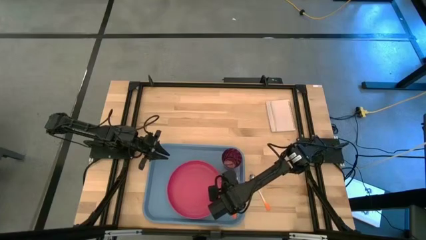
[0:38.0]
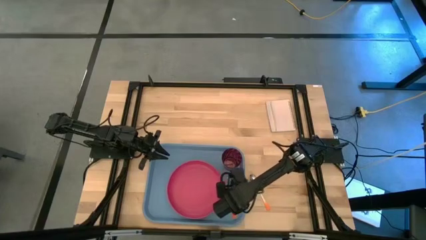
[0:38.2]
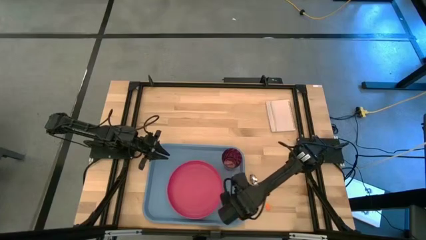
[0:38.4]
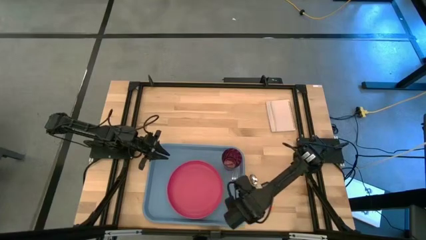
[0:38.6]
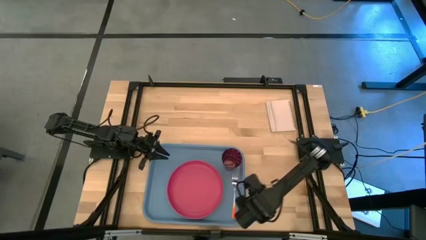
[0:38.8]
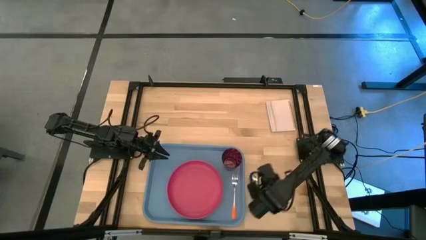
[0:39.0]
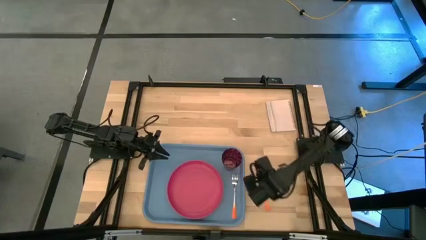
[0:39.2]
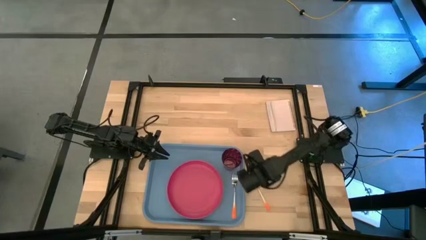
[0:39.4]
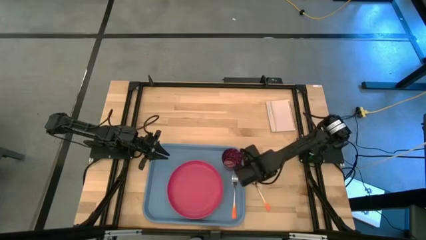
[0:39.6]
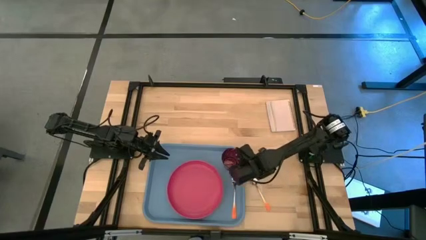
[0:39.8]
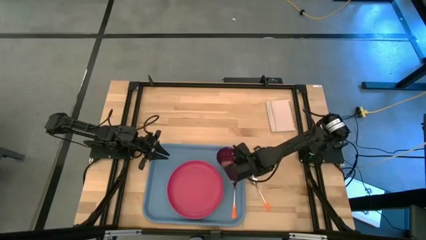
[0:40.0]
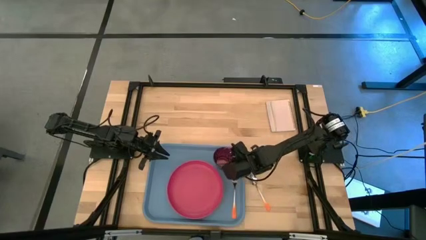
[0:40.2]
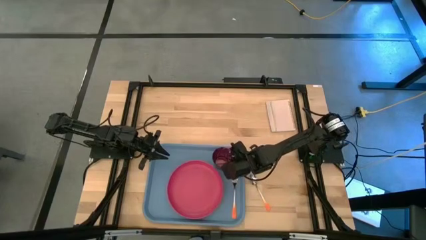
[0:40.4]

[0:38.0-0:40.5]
Task: Pick and place plate/cup/fork/spoon on tray
Adjust the red glass on the blue serving tray

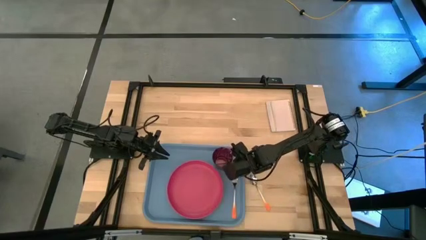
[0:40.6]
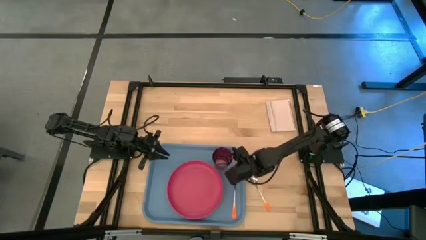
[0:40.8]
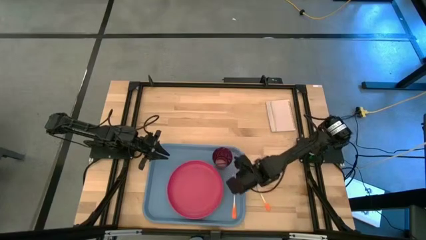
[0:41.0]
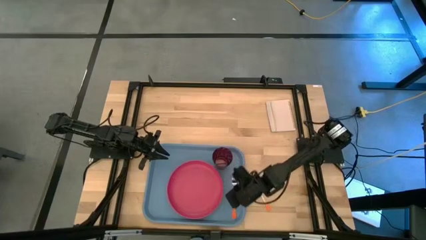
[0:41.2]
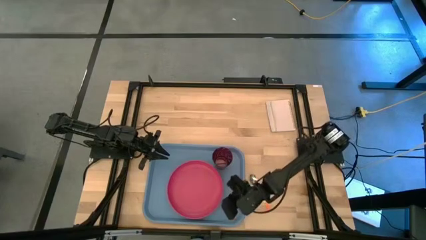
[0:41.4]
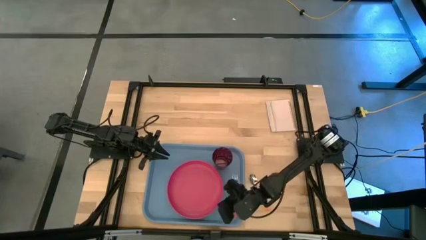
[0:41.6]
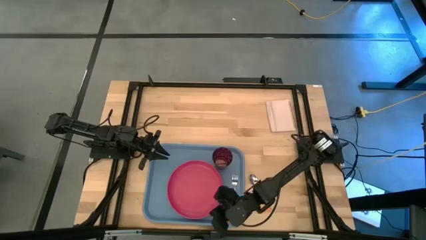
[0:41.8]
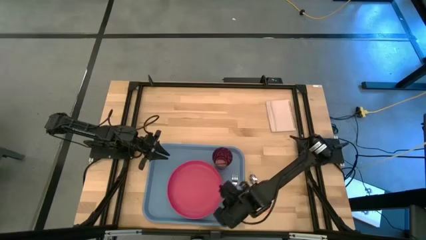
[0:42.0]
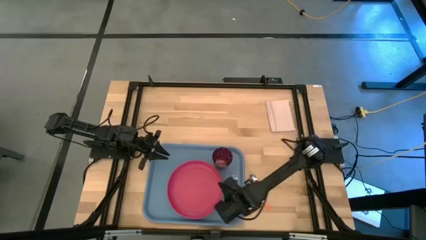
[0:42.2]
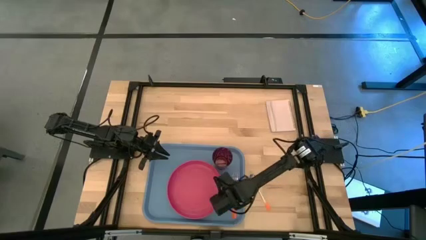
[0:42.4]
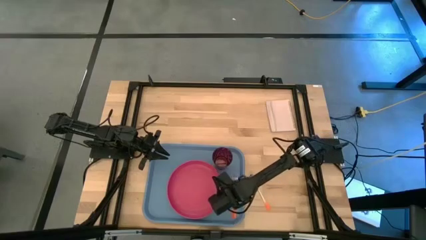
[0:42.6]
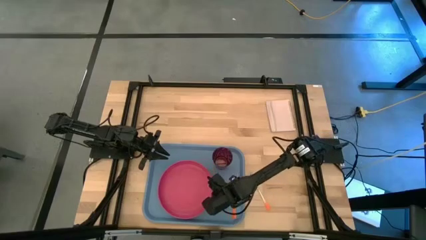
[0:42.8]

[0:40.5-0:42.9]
Adjust the pink plate on the blue serving tray

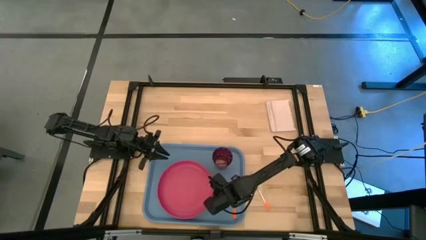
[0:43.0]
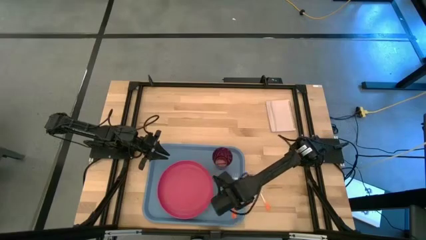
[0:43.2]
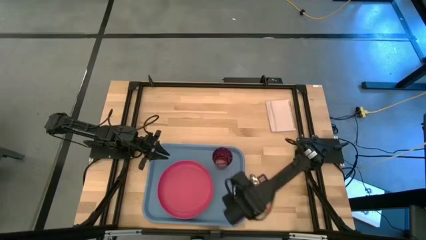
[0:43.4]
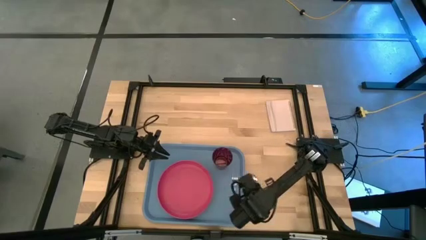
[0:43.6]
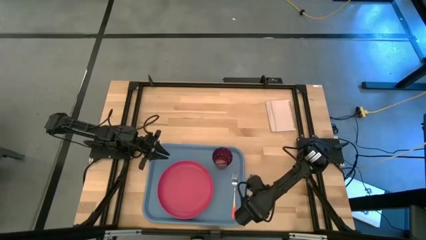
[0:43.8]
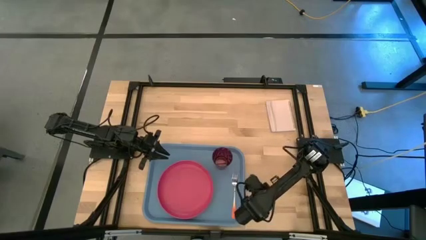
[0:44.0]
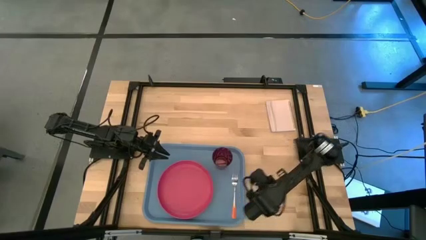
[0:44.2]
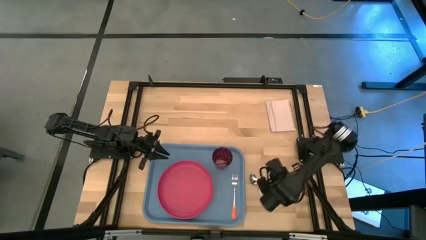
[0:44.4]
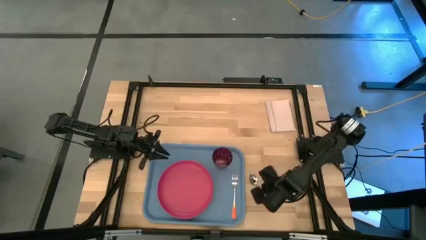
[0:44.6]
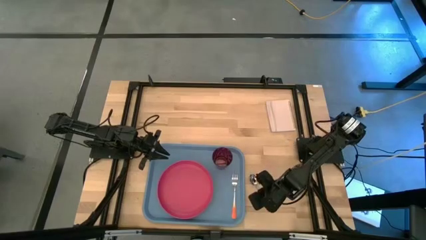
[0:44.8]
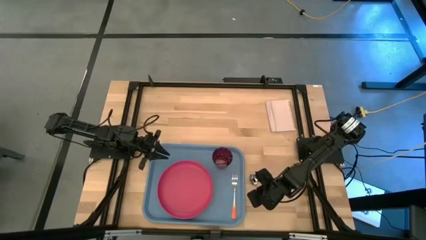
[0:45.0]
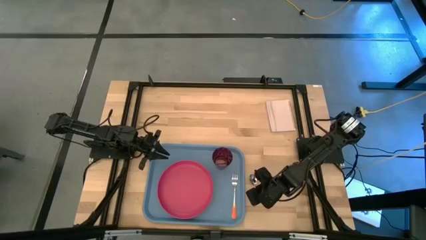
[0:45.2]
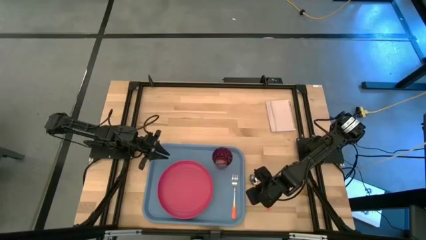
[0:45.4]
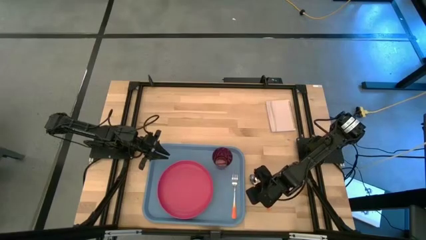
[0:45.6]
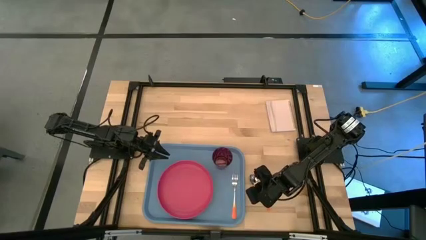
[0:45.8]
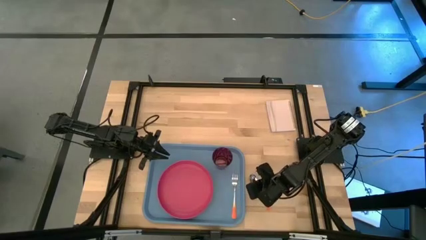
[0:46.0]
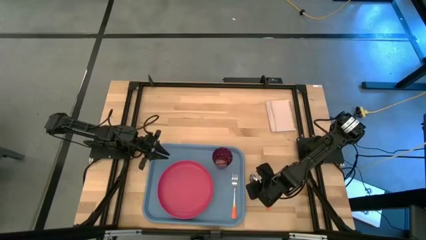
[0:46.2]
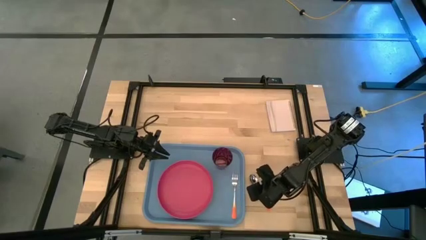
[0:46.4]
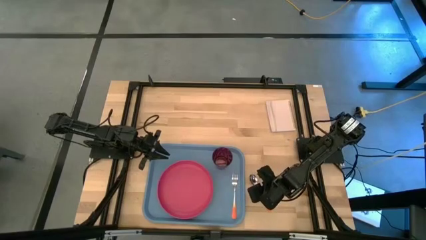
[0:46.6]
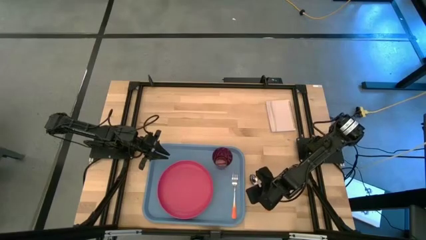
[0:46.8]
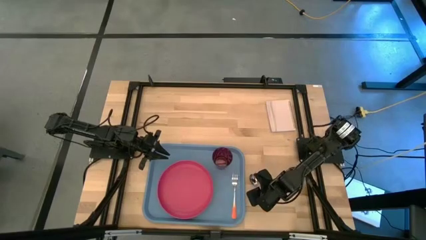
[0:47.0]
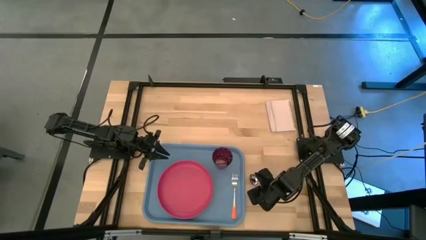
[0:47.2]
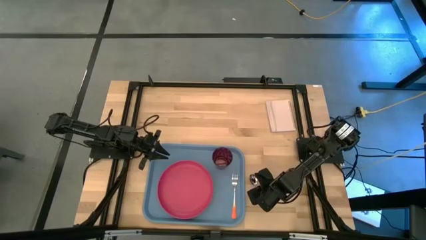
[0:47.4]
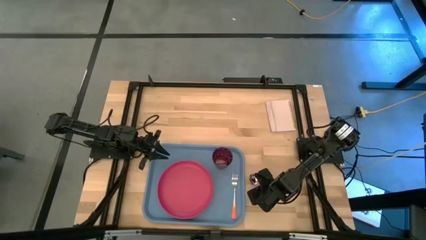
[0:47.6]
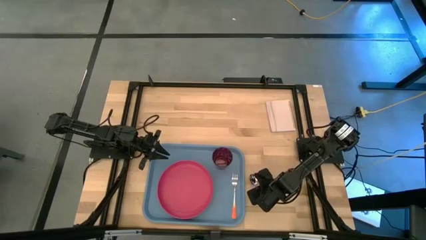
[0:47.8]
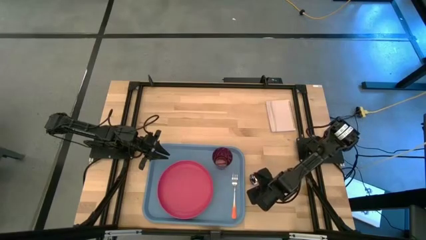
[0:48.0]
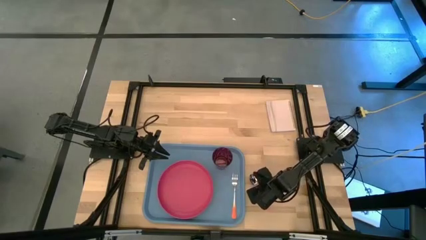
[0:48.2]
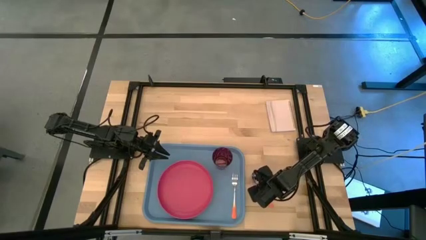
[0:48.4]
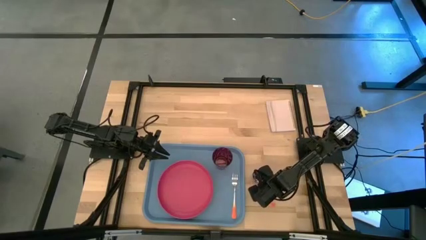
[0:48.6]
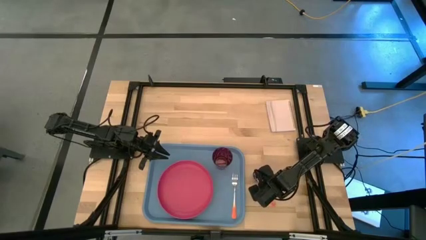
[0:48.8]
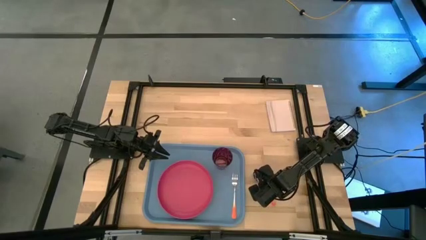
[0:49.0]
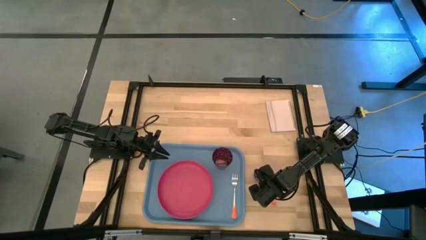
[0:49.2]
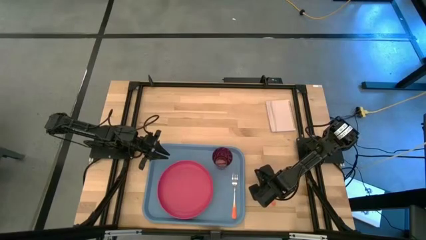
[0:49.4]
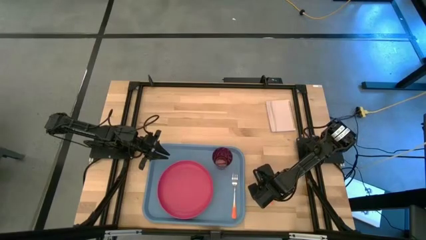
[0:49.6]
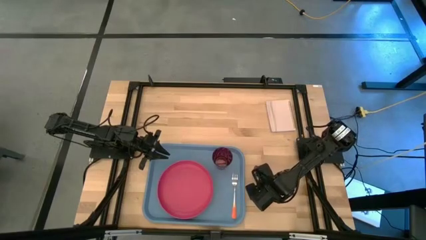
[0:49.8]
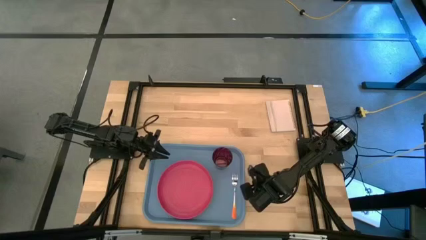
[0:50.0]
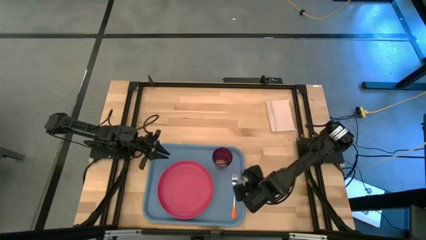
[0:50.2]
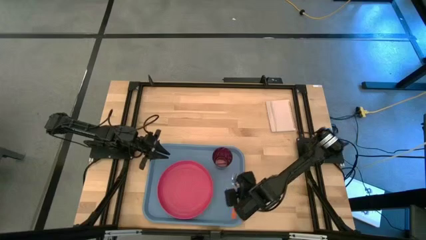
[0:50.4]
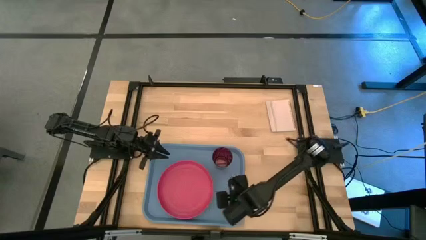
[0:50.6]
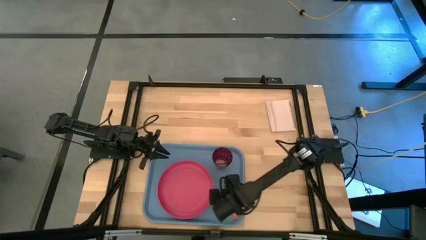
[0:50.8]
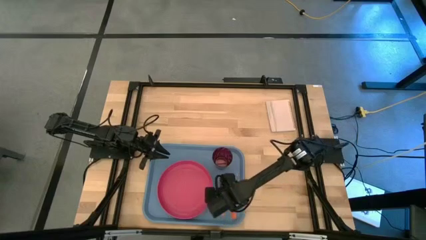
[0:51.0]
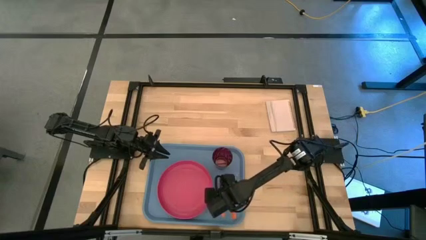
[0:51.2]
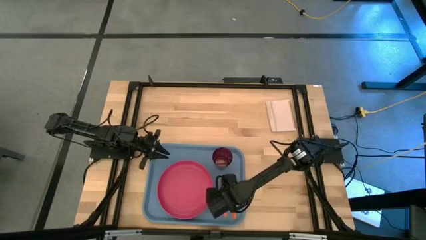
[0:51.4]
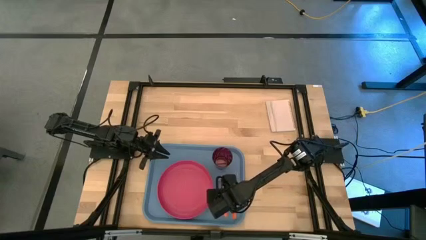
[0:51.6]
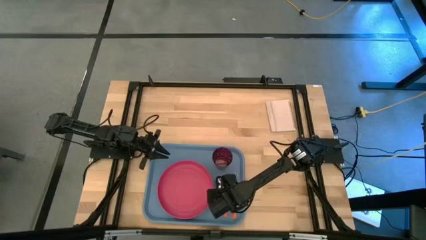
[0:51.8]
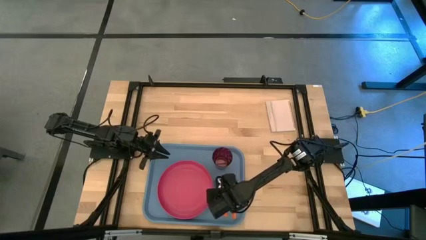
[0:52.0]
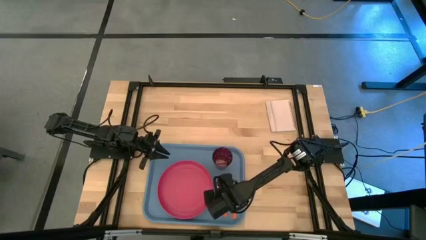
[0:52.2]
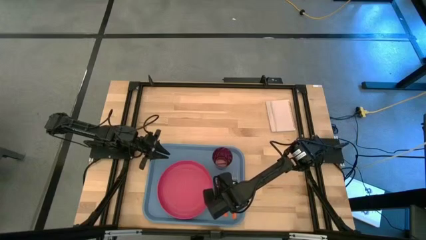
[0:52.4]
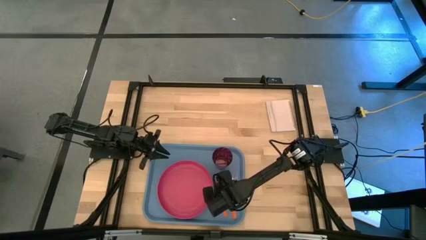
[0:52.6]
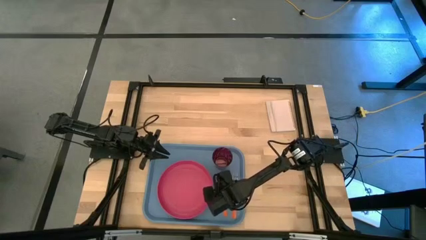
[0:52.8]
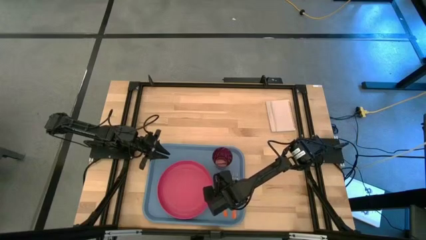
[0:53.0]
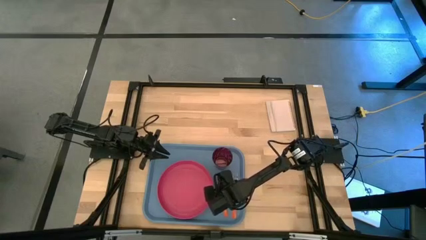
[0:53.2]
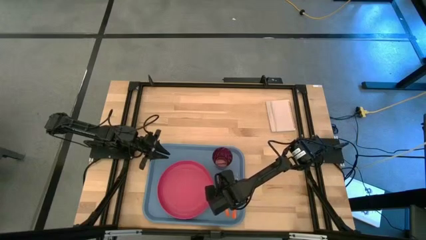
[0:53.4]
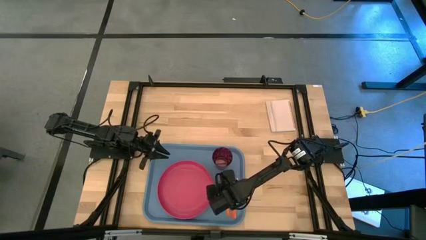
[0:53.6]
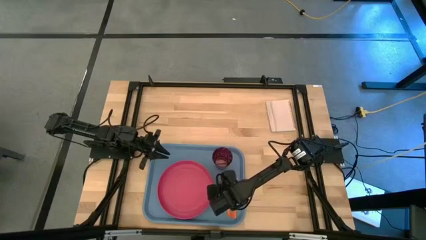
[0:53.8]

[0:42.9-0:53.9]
Put the orange spoon on the blue serving tray to the left of the orange fork
